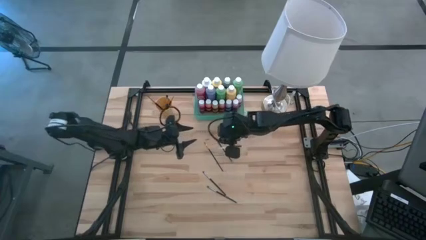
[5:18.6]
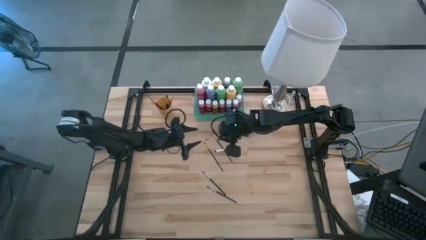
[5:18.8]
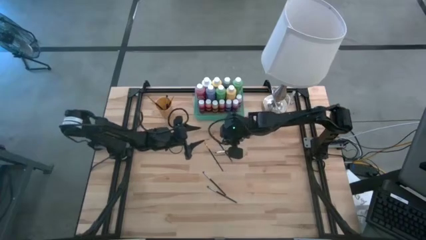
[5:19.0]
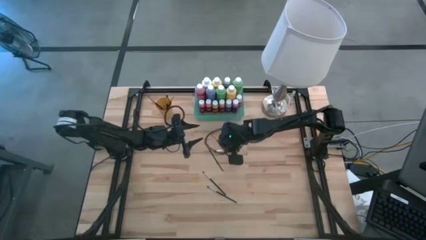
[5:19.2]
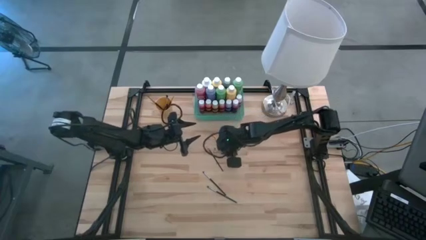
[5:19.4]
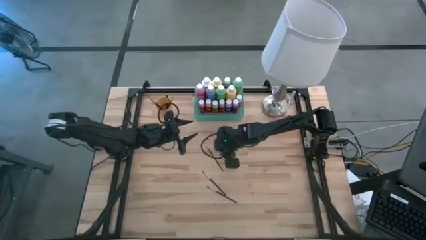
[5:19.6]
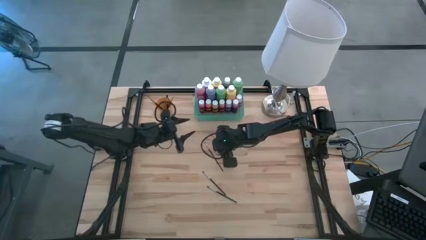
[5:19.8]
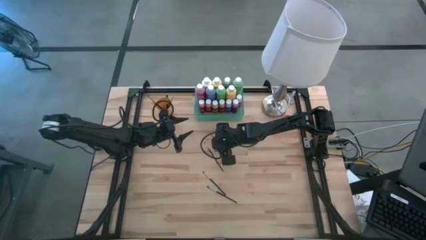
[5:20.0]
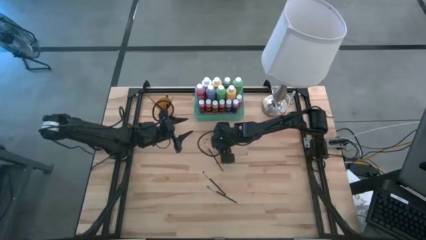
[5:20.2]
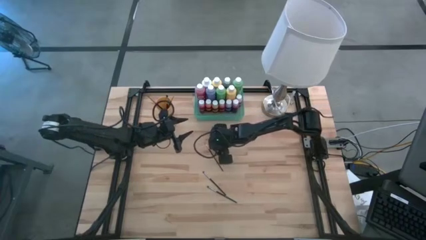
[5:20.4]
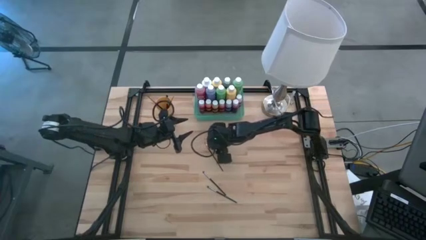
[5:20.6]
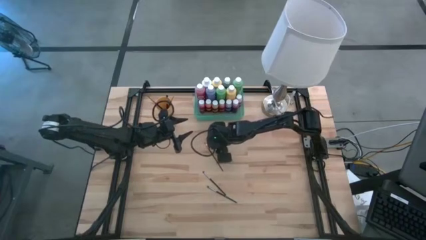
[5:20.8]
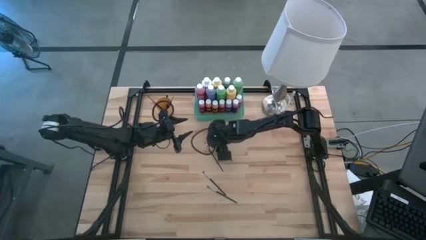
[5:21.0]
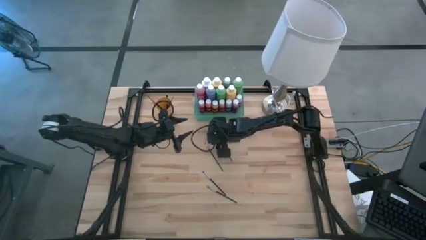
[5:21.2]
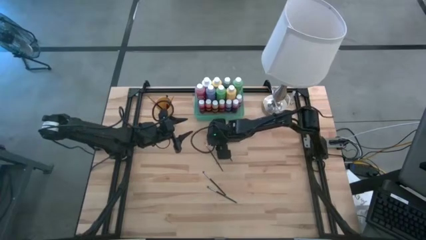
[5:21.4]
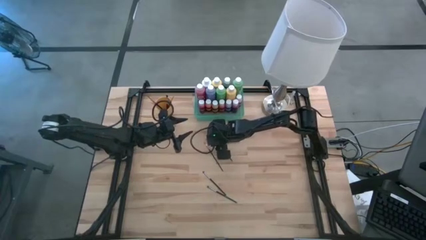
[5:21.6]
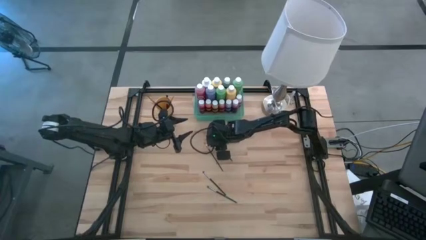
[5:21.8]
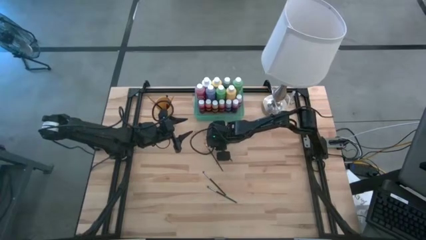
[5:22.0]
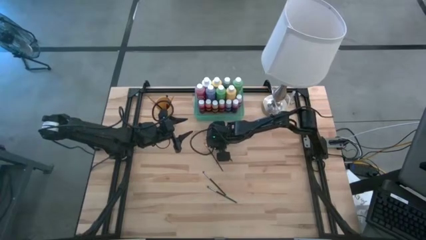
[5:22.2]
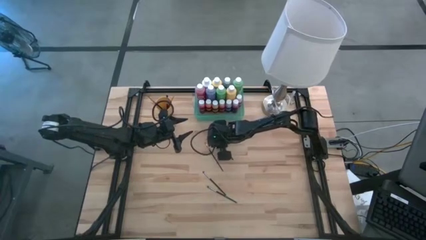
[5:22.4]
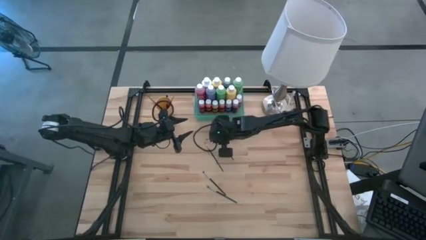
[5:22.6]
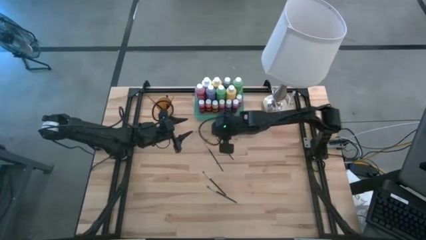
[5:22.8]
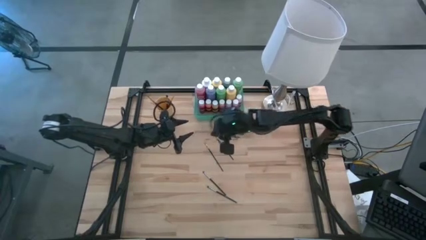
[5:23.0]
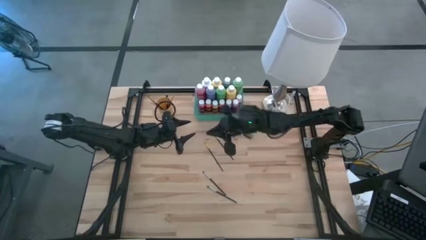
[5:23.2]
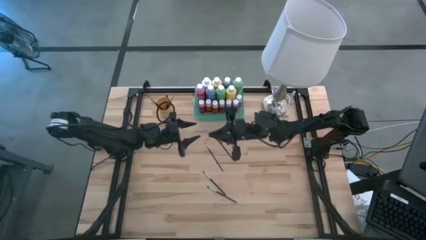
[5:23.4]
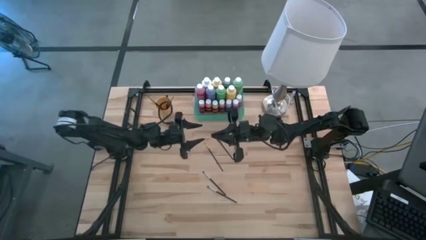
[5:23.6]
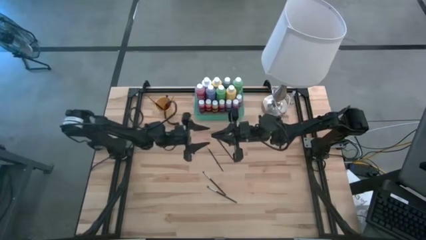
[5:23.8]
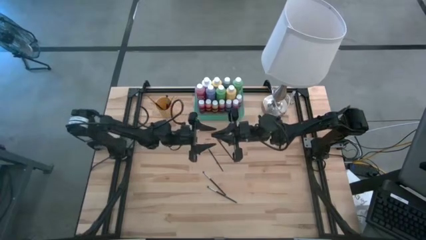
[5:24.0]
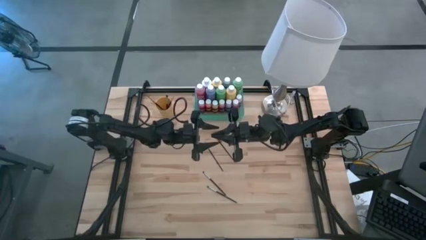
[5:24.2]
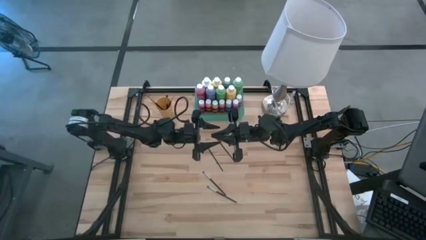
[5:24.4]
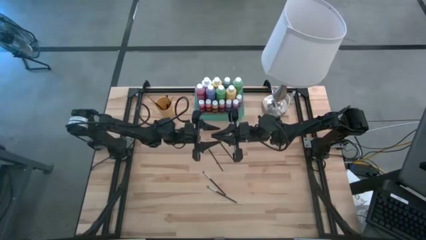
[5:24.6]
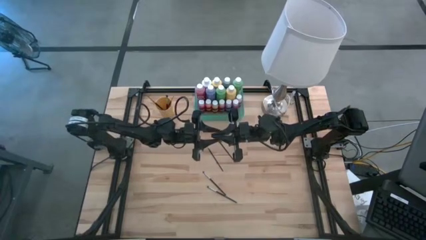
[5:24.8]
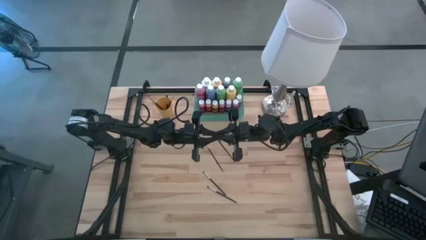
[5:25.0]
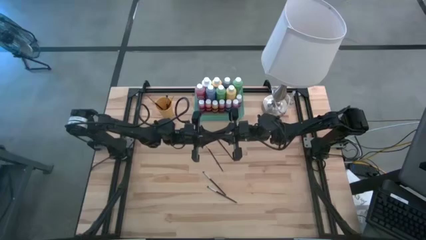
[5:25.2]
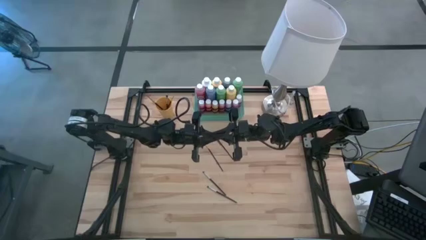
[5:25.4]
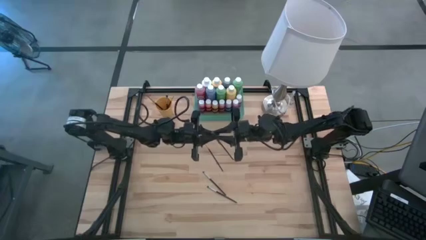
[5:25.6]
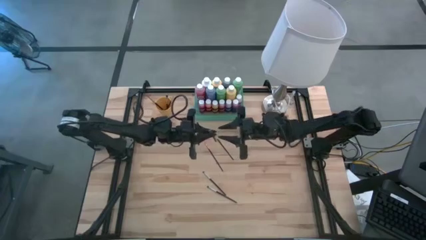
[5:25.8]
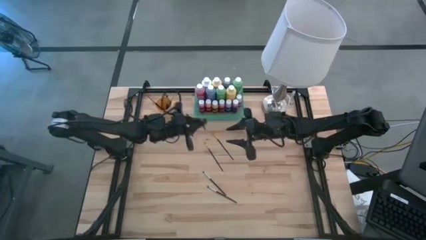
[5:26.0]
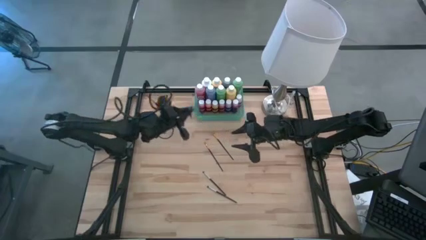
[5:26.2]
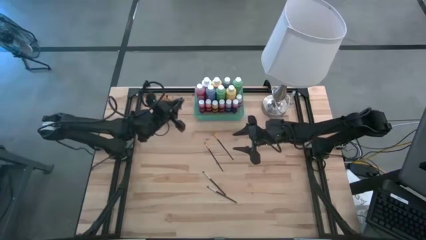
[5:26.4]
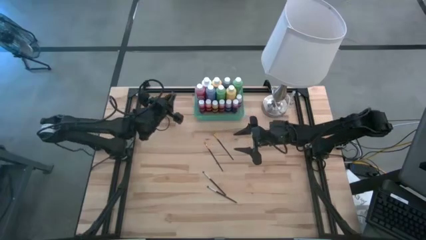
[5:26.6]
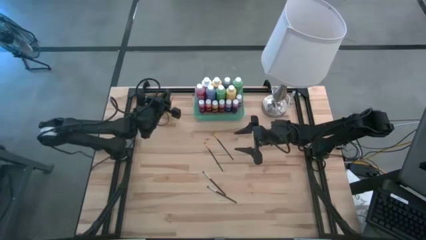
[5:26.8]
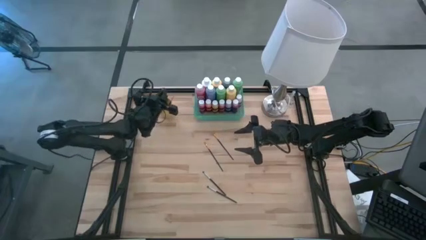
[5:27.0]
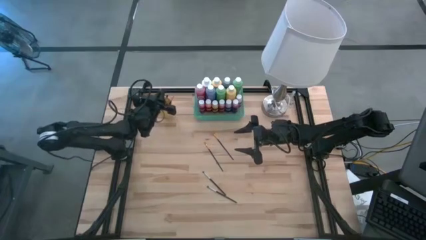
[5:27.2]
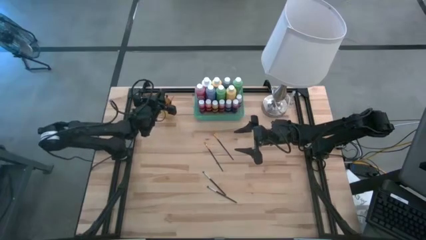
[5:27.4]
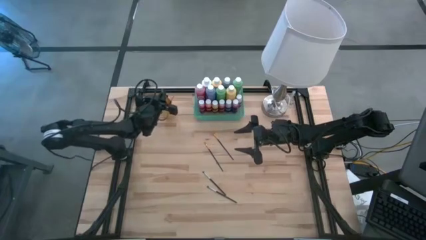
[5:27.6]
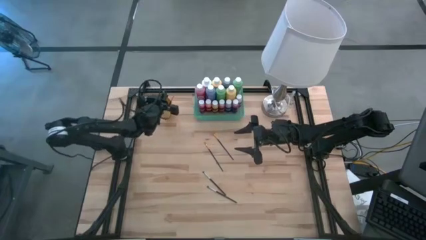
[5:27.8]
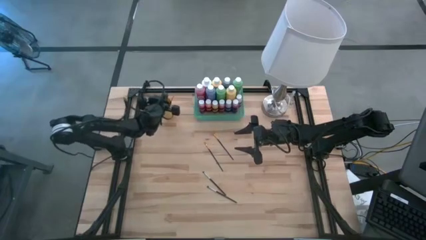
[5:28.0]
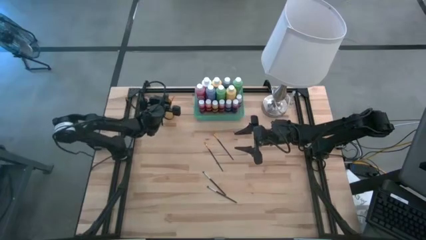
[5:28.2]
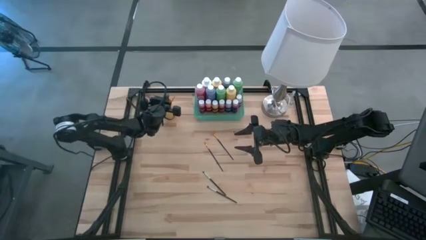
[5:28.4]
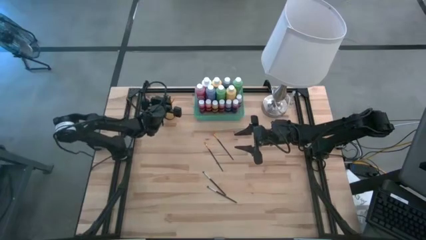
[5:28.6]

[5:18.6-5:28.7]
Task: Pick & Place Paint Supplies
Put the silver paintbrush into the orange cup

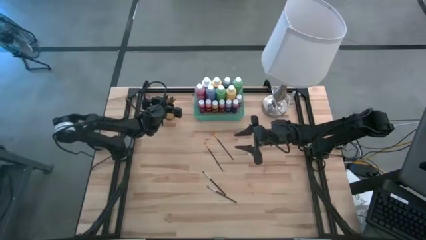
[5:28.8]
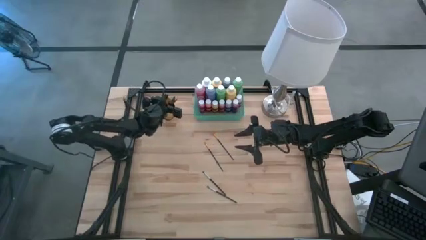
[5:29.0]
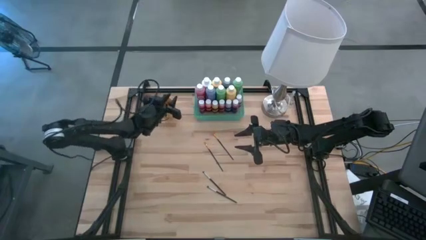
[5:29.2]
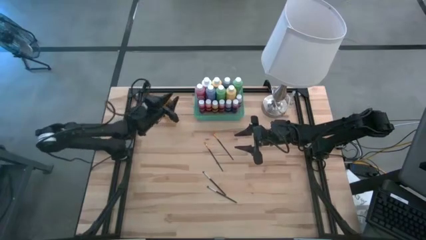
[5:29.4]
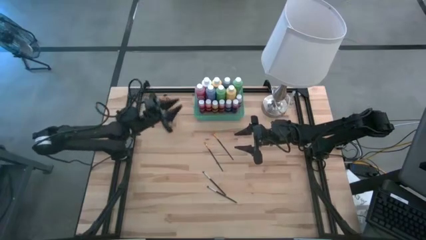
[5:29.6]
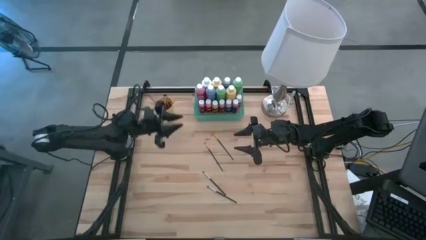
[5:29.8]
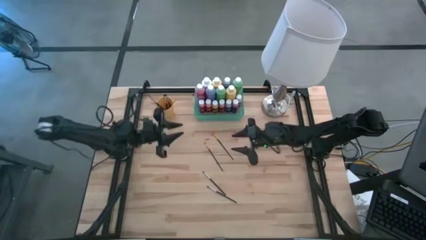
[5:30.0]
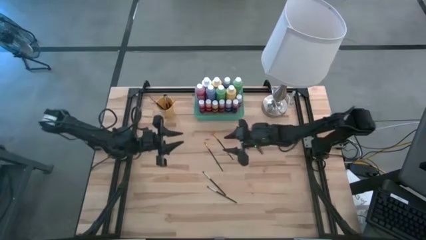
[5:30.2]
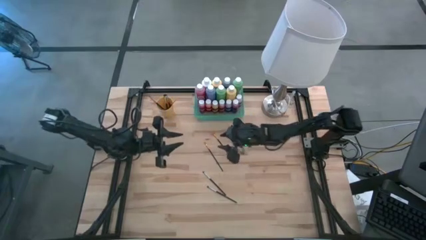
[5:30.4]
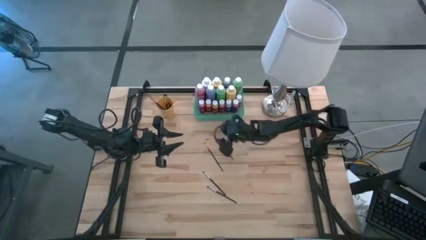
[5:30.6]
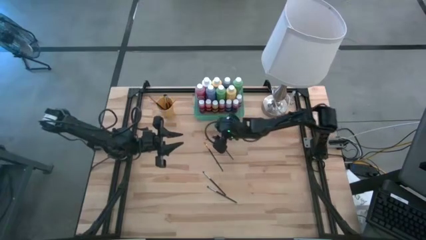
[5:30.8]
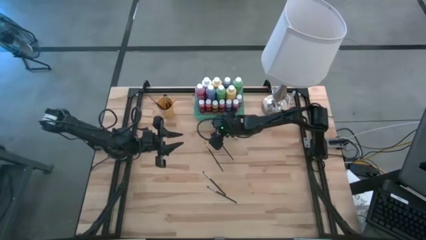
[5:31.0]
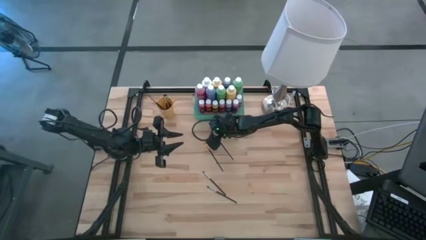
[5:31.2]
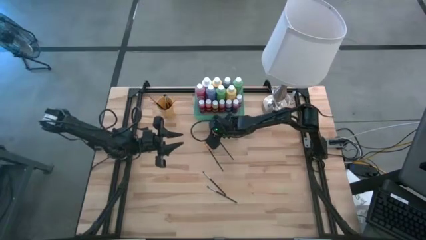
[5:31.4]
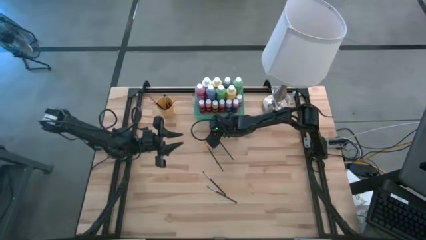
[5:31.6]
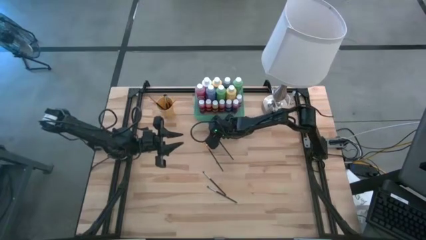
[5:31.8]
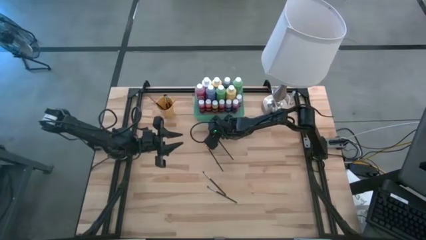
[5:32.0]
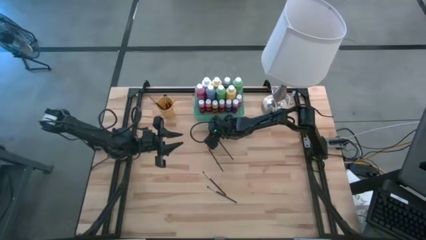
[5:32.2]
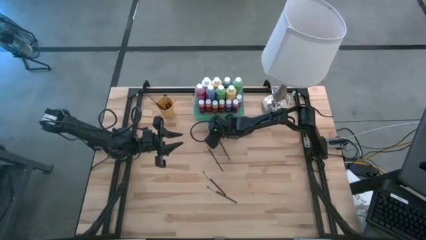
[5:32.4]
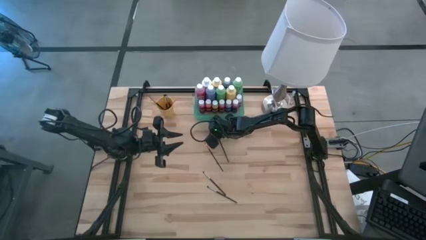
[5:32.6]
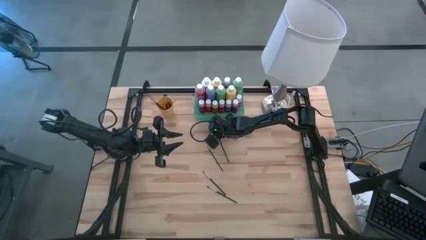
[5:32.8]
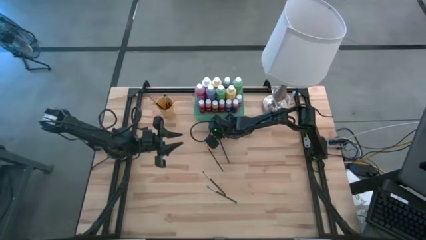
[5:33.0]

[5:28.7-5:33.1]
Put the gold paintbrush into the orange cup

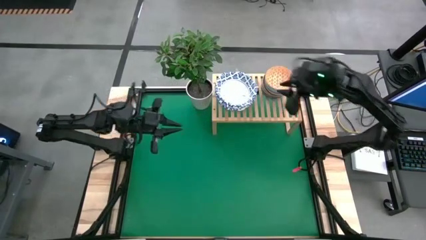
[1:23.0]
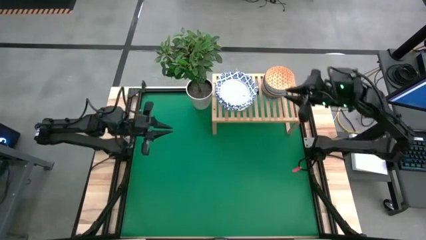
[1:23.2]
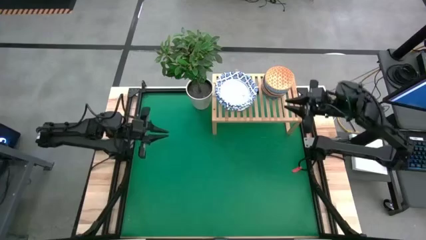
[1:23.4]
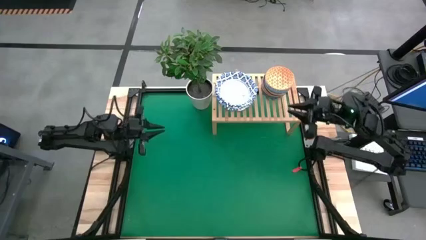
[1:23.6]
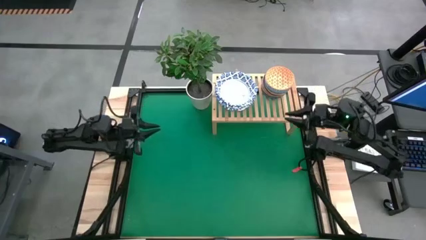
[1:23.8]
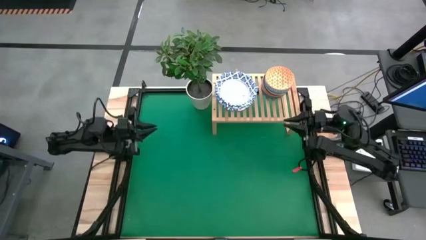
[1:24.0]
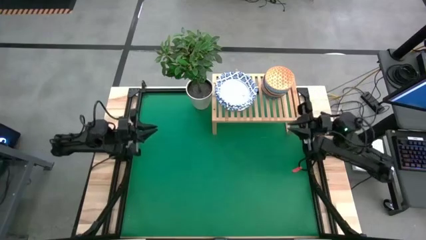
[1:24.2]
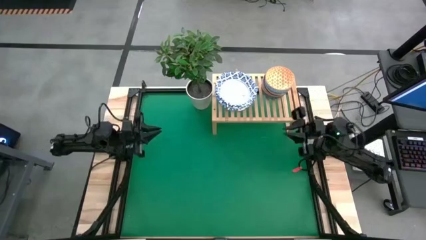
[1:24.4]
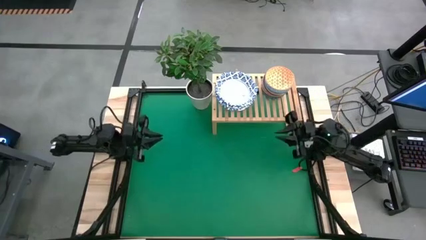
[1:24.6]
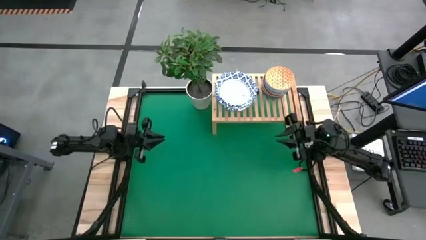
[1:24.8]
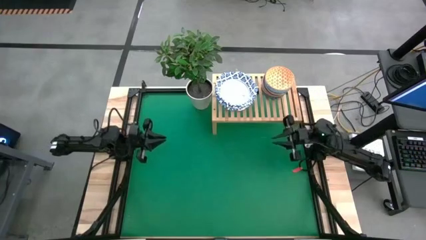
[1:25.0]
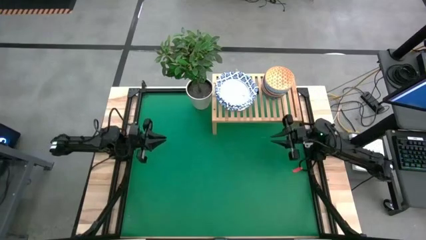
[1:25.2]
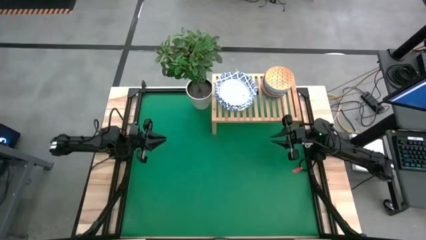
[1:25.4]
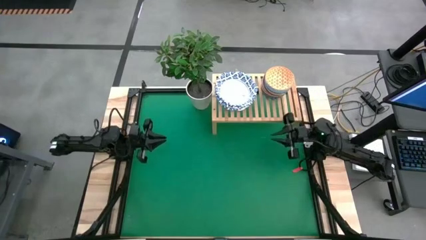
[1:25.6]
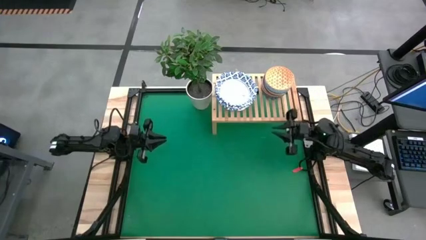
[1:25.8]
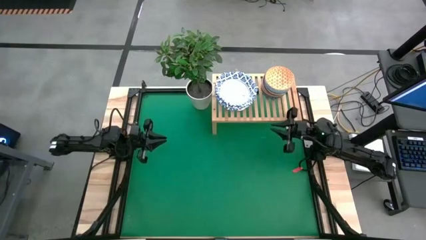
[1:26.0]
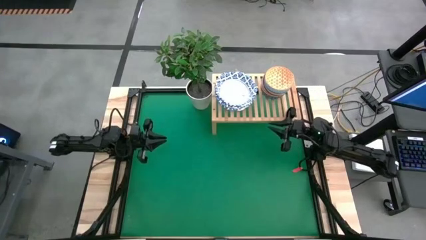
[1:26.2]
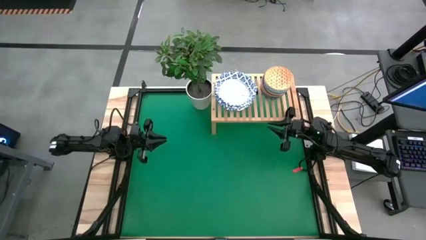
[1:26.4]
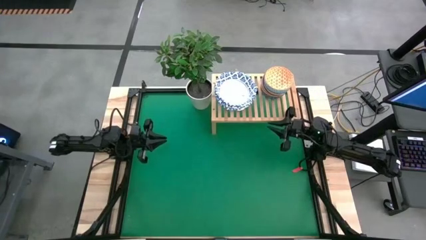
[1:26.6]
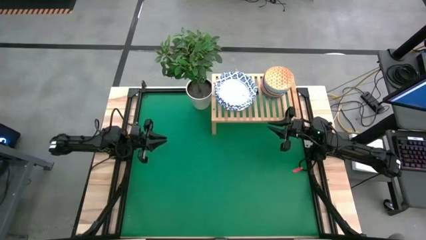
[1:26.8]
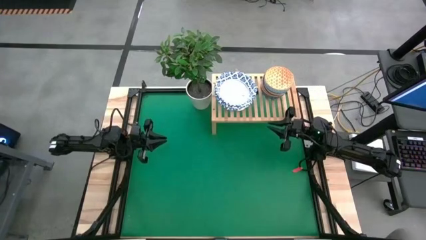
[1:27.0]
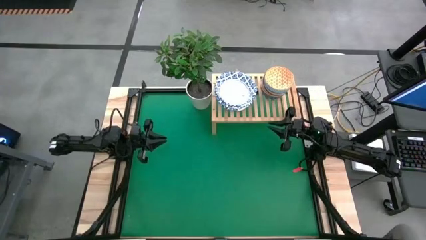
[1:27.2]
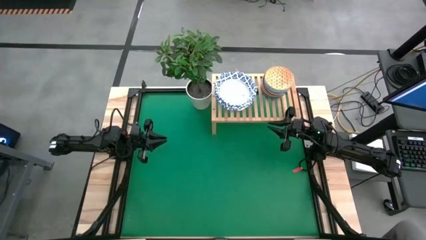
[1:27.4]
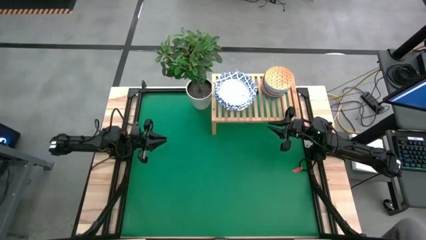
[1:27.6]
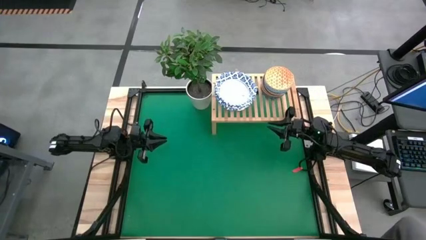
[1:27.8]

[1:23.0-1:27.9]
Task: Place and stack bowls onto a shelf
Return to Home Position
